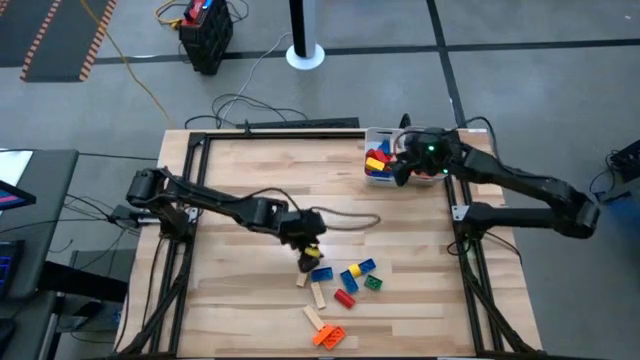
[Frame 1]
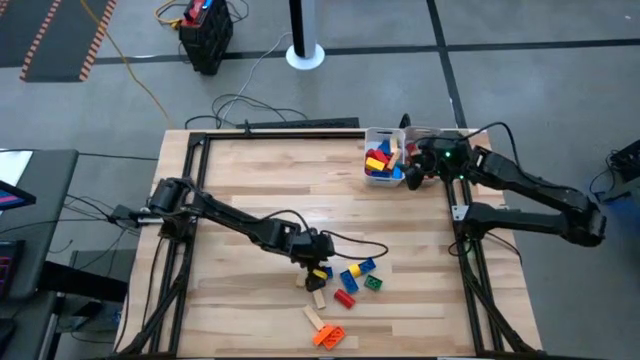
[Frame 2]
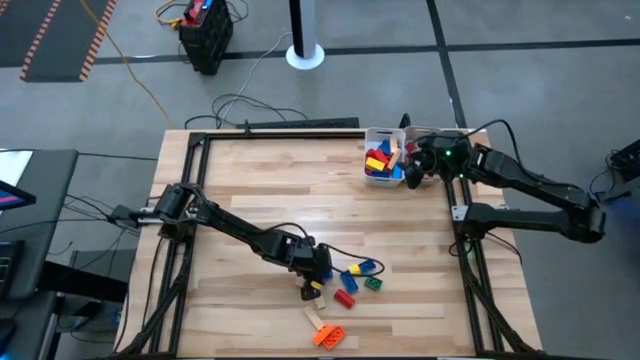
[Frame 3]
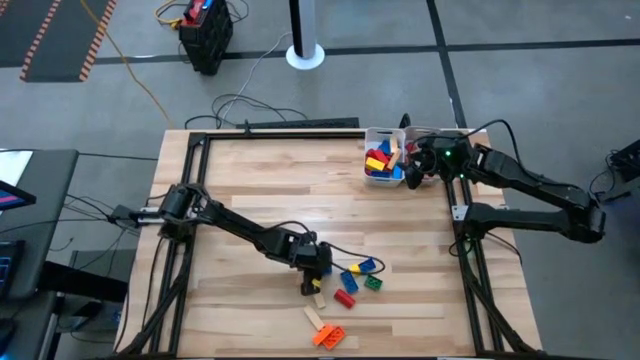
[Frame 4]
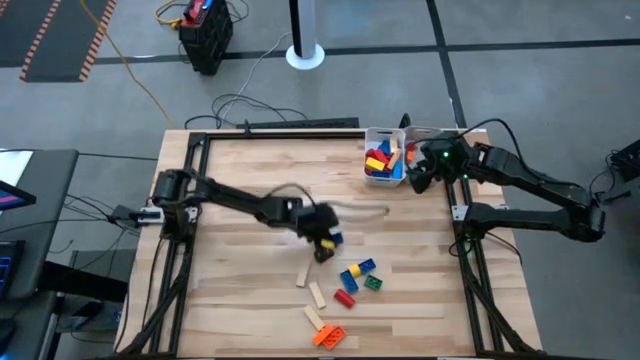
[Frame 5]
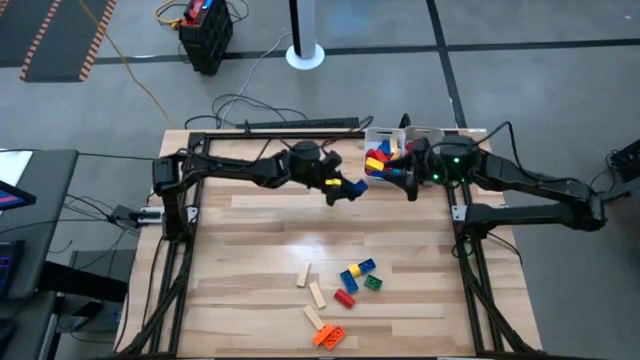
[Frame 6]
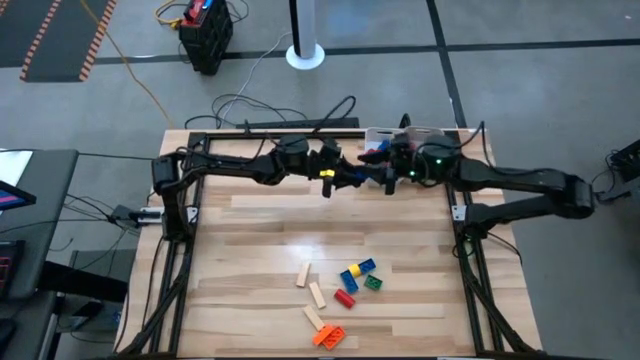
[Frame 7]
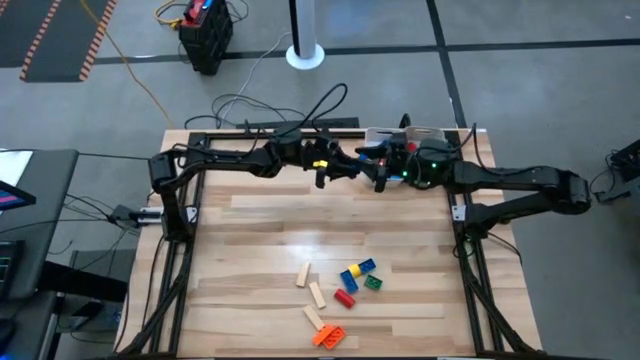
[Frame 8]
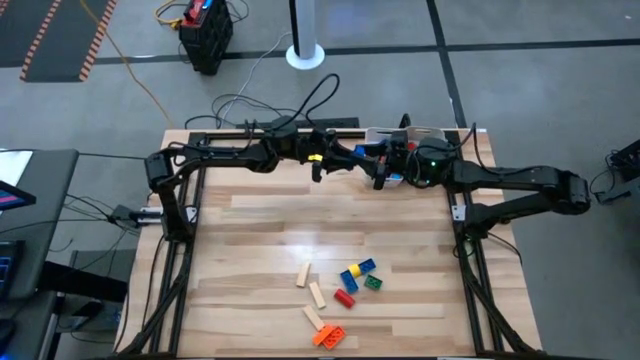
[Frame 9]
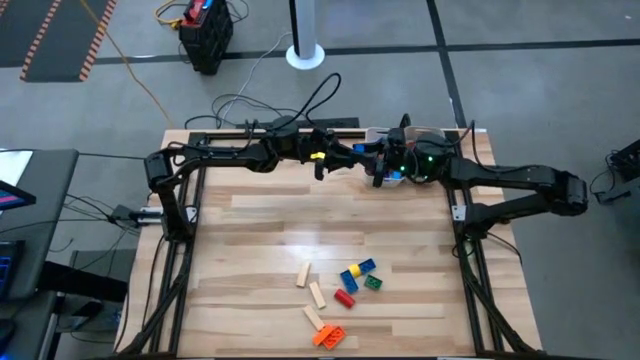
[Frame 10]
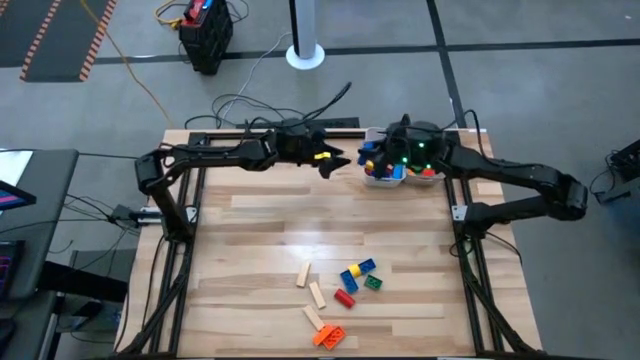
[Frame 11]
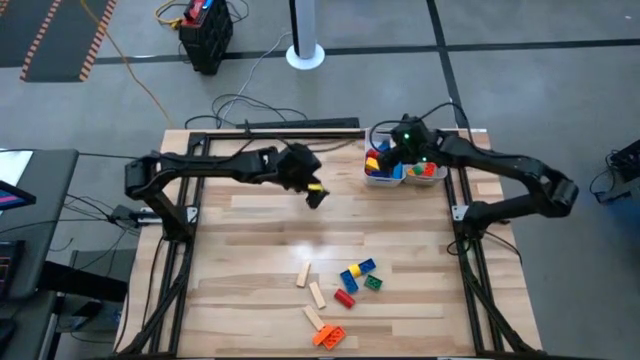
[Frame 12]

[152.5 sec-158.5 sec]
Task: Sort blocks by size
Put the large blue game piece into the white bin

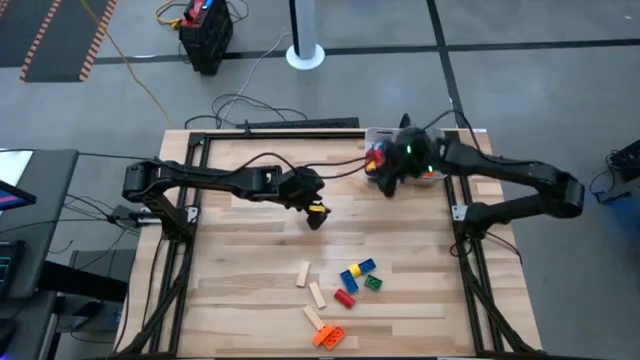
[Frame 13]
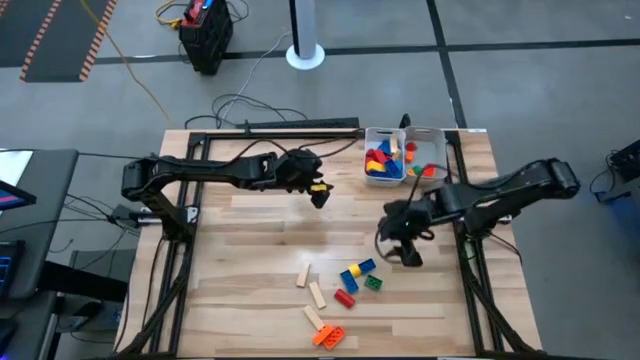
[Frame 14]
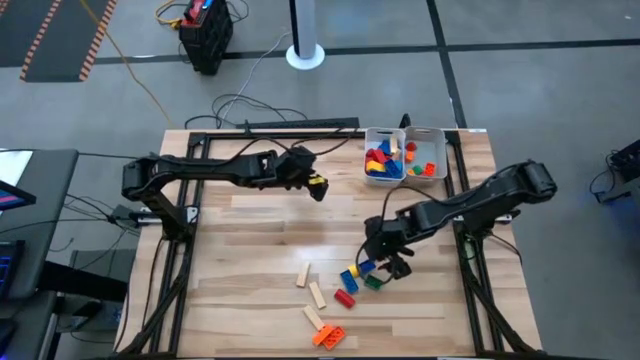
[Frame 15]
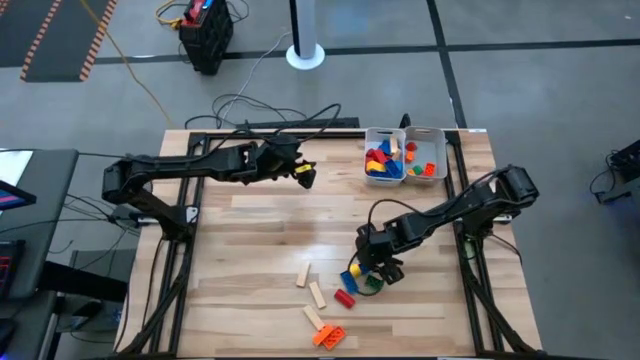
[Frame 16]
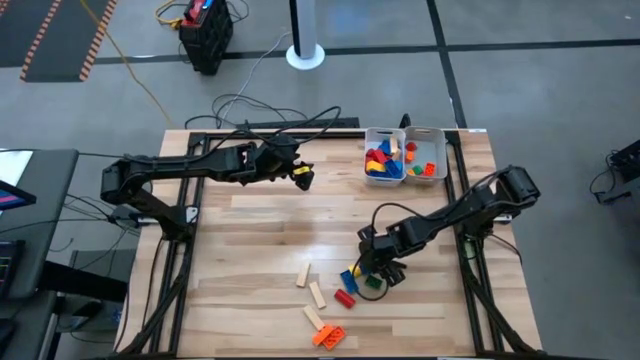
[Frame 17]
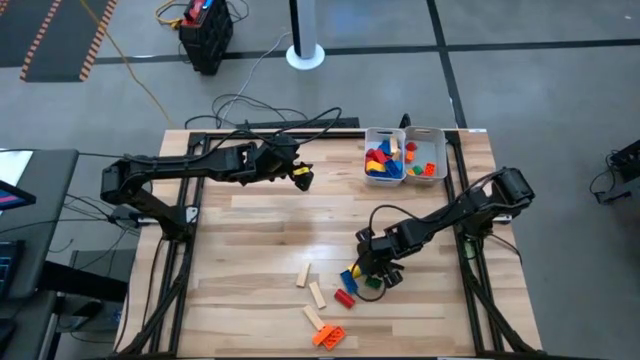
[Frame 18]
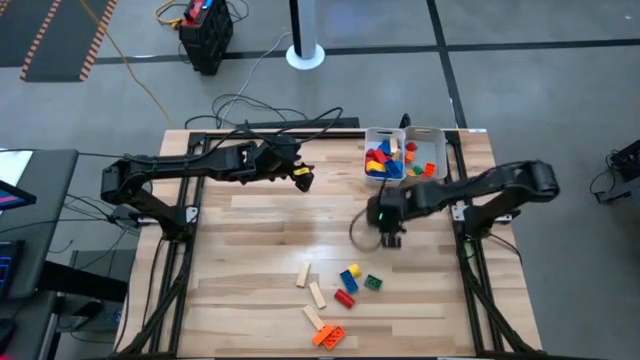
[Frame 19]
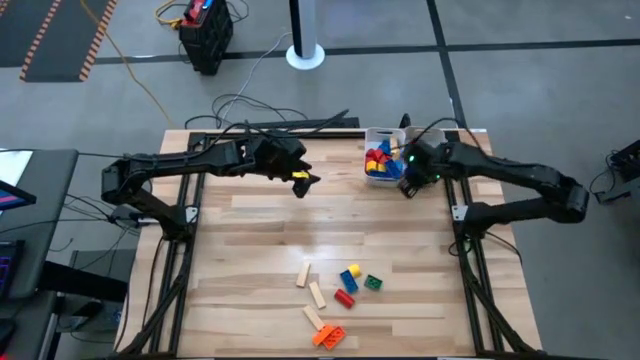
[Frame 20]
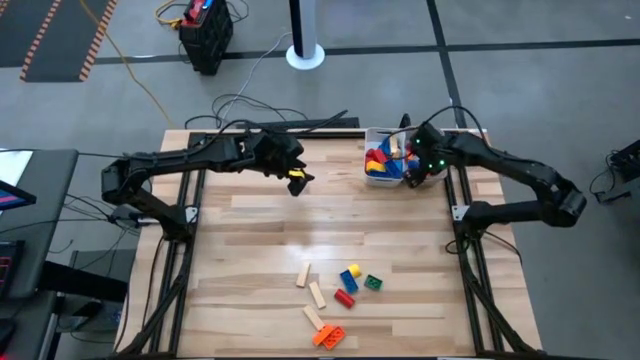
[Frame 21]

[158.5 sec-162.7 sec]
Put the small blue game piece into the gray bin

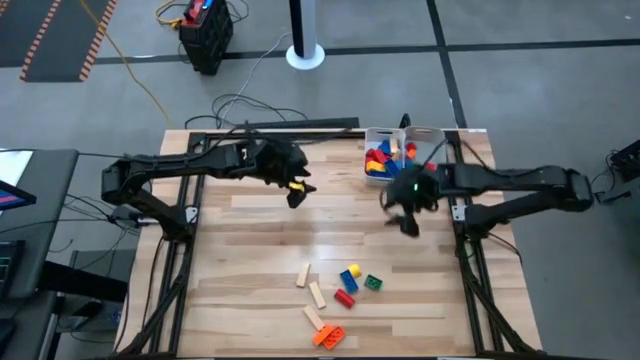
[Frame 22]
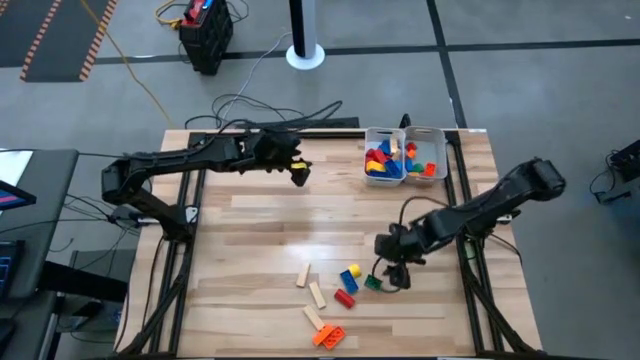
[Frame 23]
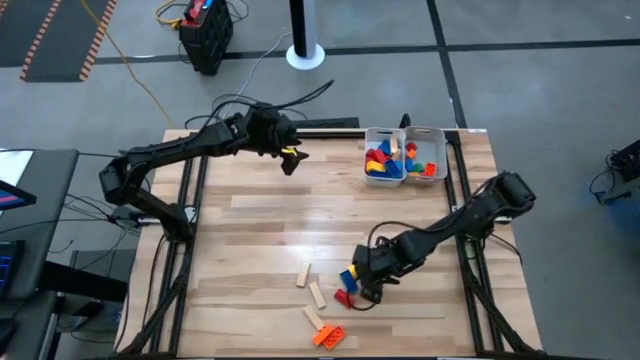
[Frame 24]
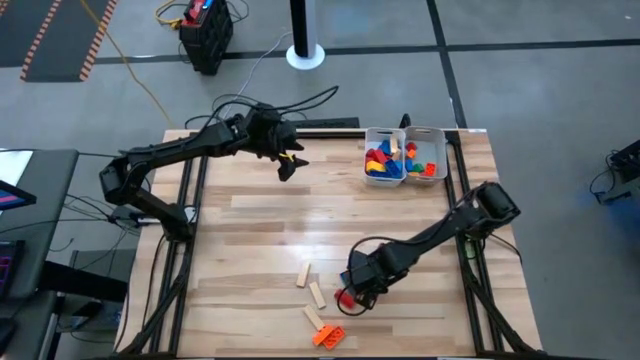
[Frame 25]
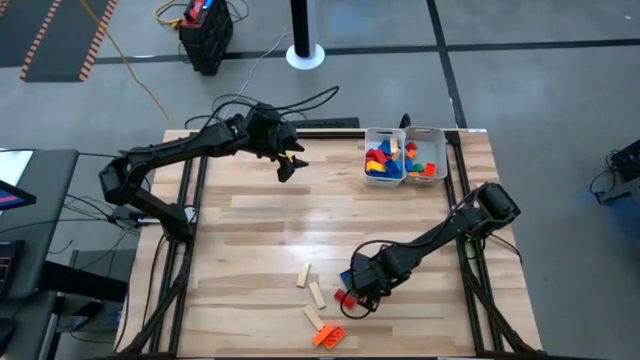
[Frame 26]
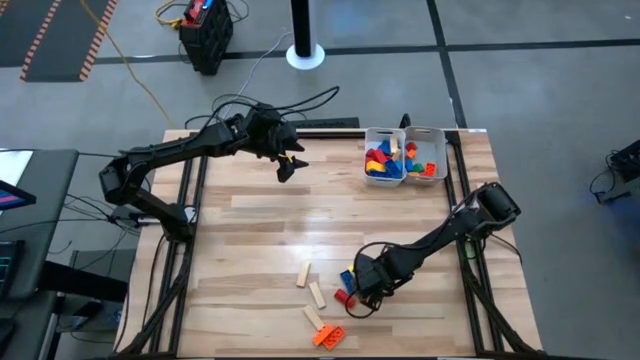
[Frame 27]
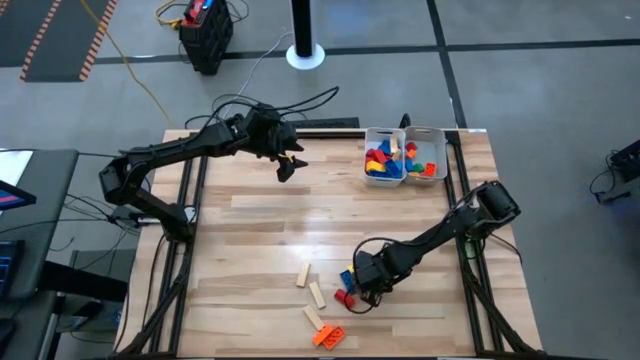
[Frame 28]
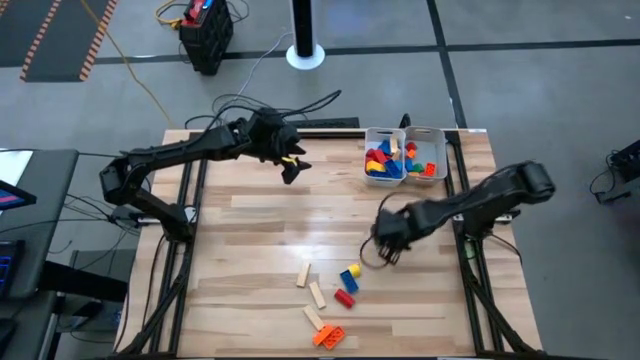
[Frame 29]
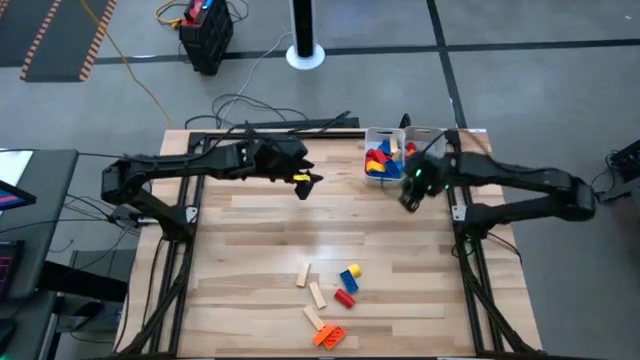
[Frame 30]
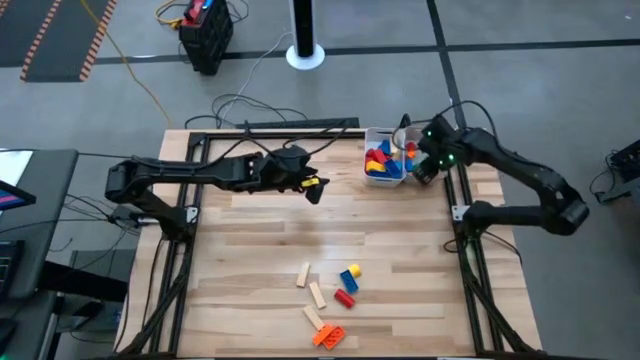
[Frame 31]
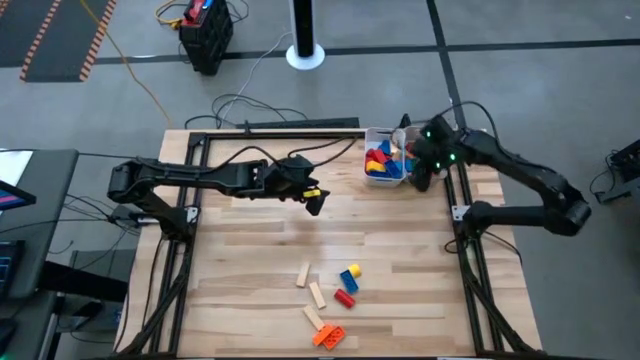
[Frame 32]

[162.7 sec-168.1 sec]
Put the small green game piece into the gray bin

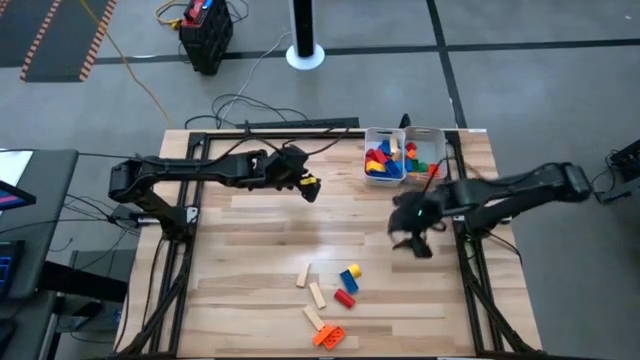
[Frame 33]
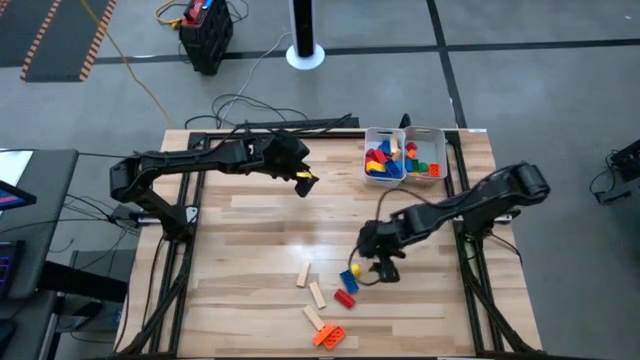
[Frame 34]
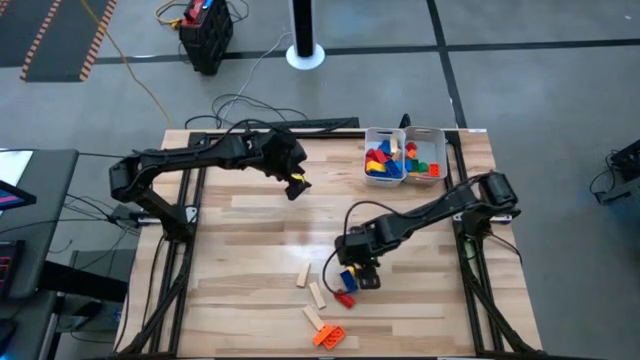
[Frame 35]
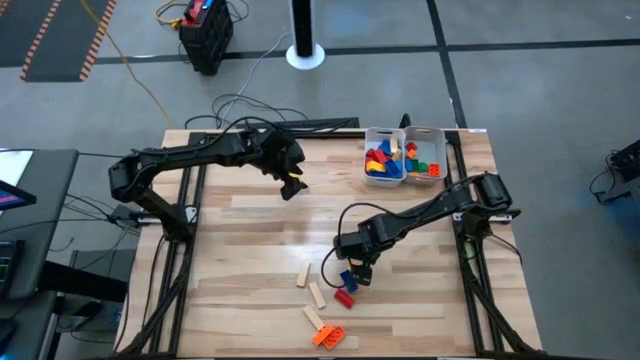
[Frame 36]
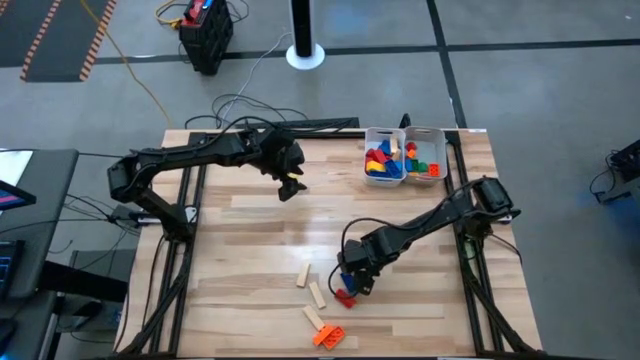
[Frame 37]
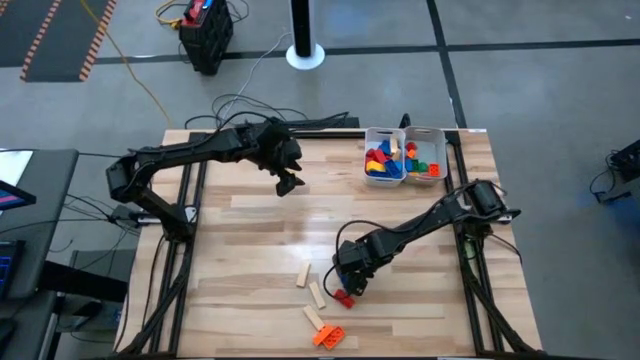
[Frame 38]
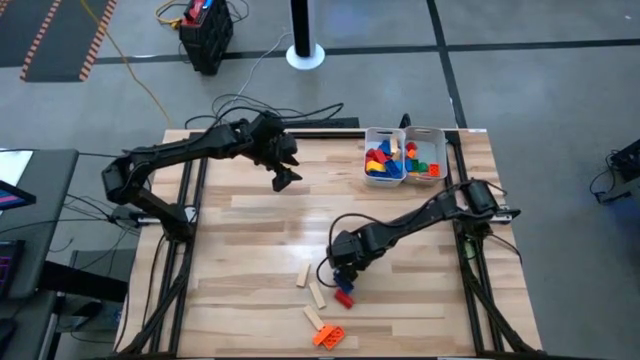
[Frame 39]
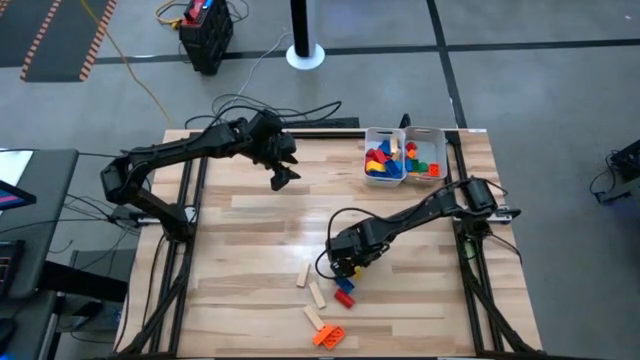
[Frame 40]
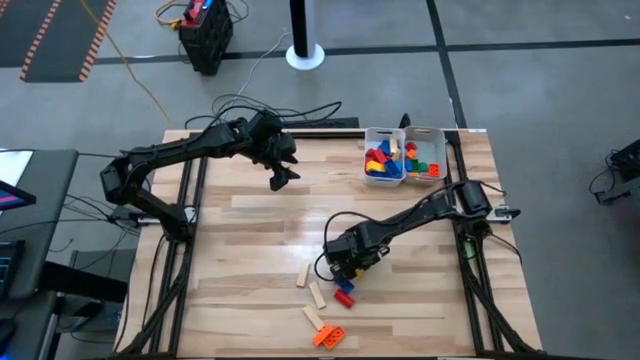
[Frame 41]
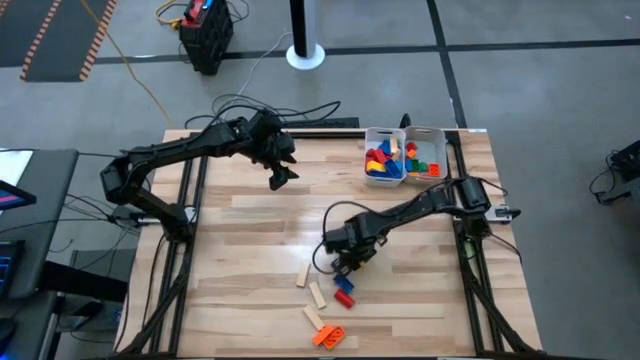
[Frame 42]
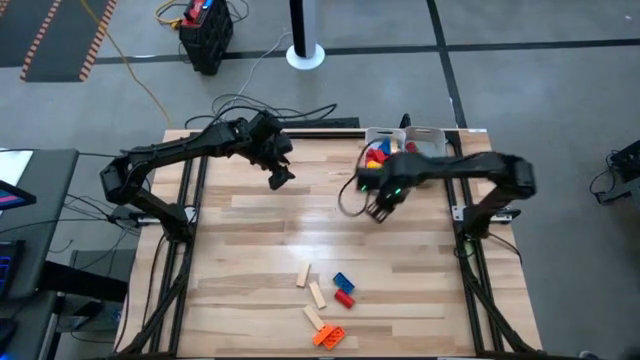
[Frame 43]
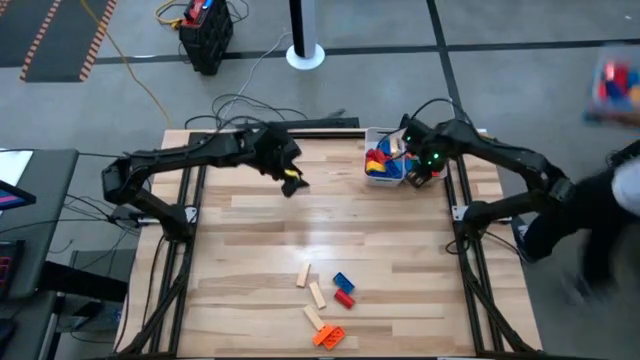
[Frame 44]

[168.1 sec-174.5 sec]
Put the small yellow semi circular wooden block into the gray bin
